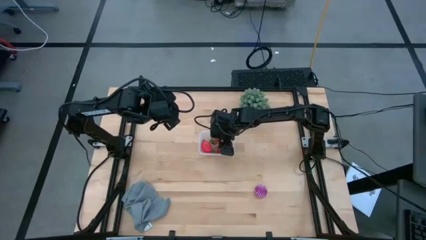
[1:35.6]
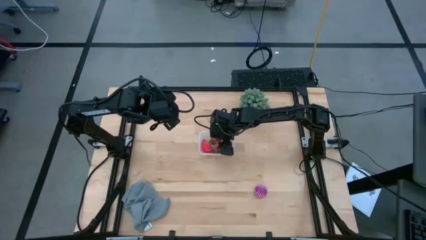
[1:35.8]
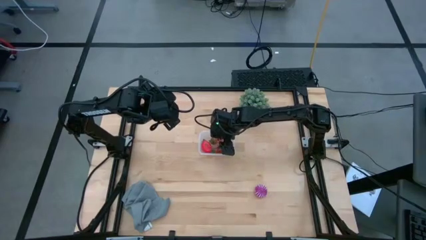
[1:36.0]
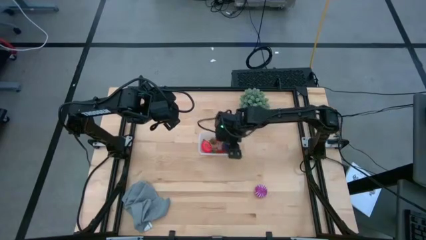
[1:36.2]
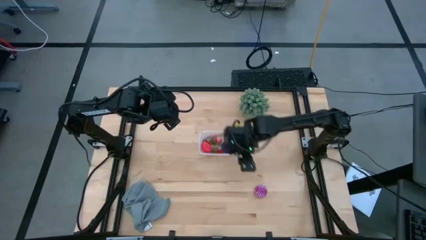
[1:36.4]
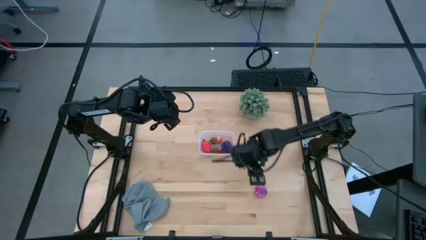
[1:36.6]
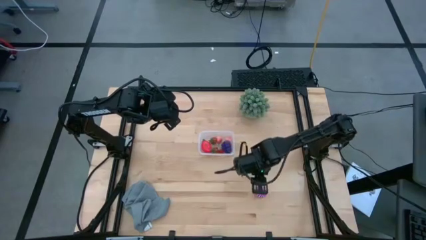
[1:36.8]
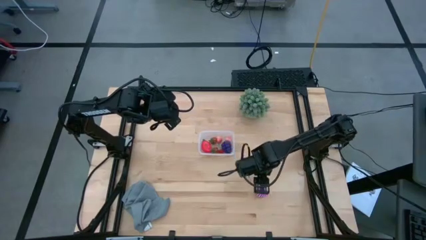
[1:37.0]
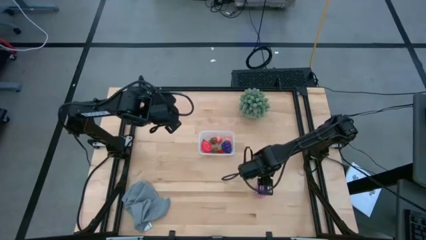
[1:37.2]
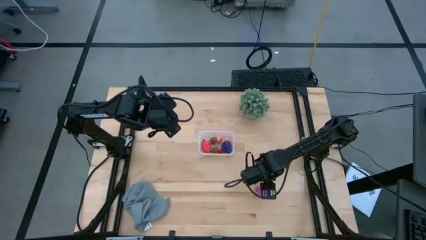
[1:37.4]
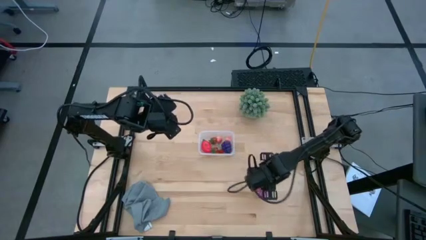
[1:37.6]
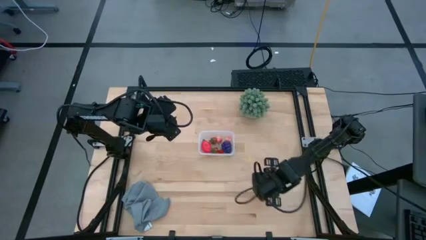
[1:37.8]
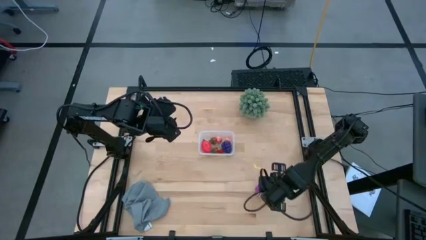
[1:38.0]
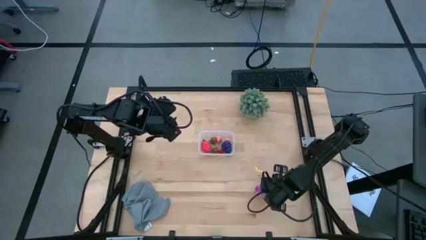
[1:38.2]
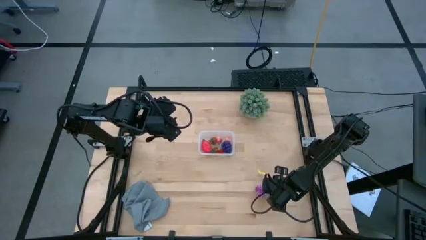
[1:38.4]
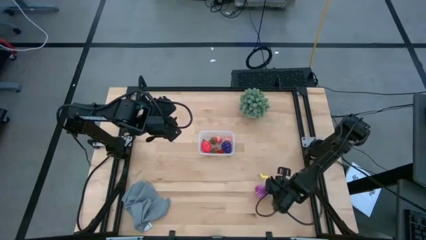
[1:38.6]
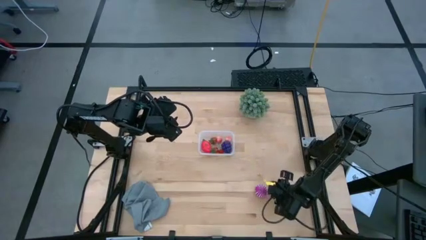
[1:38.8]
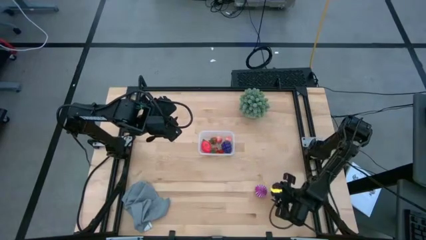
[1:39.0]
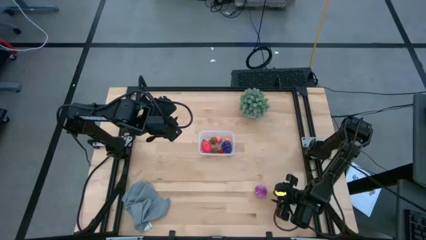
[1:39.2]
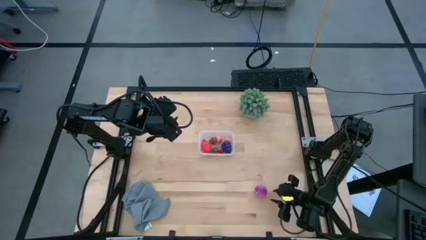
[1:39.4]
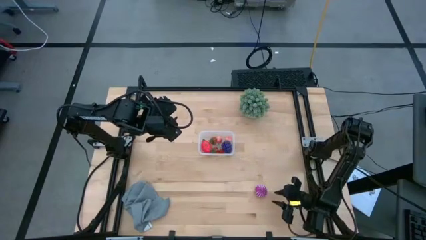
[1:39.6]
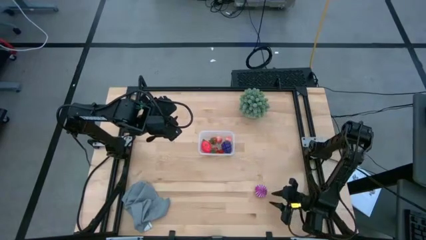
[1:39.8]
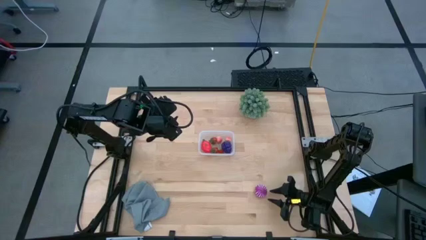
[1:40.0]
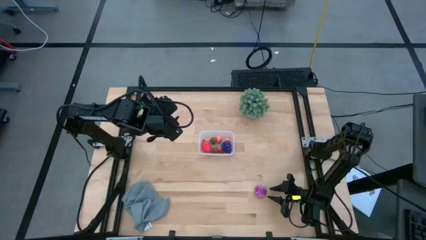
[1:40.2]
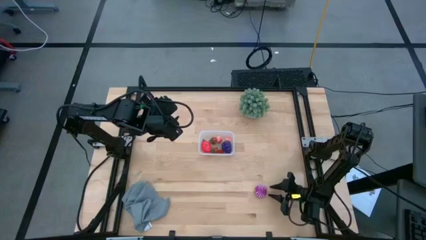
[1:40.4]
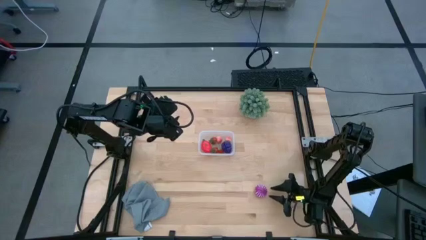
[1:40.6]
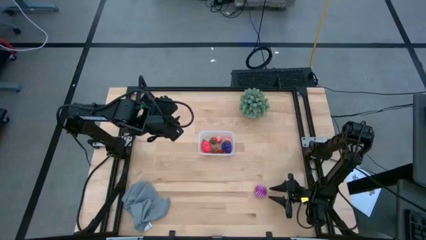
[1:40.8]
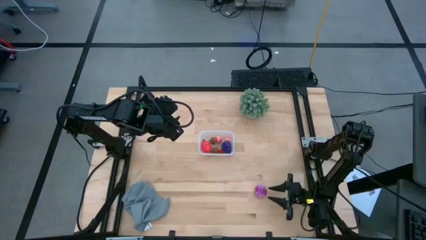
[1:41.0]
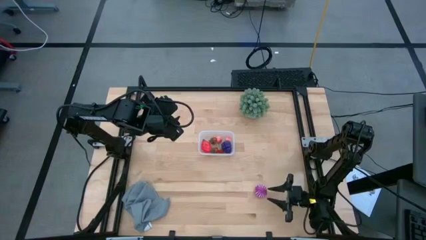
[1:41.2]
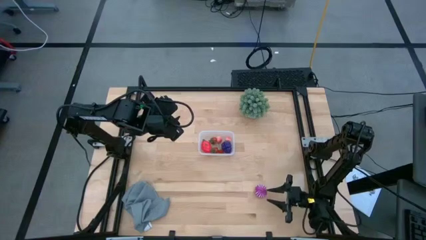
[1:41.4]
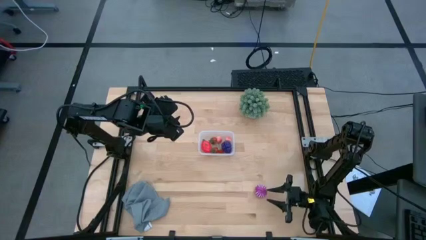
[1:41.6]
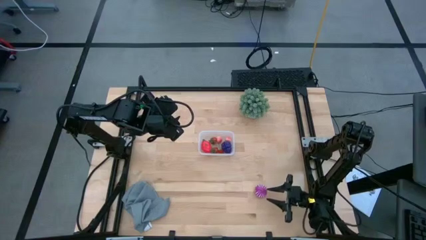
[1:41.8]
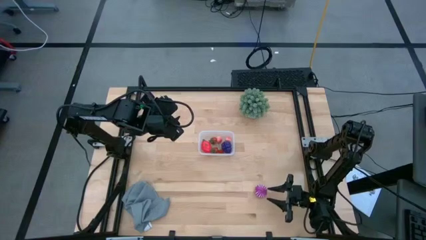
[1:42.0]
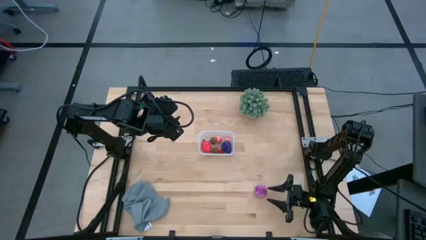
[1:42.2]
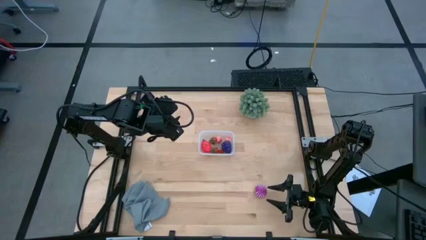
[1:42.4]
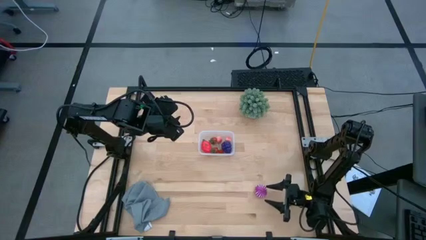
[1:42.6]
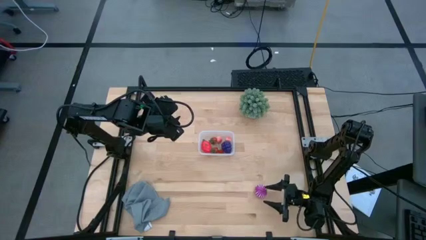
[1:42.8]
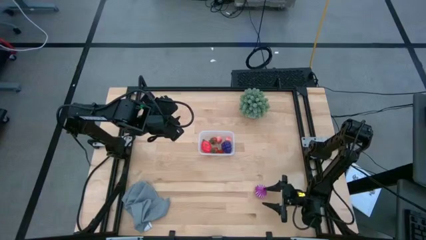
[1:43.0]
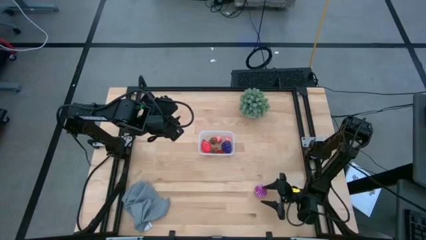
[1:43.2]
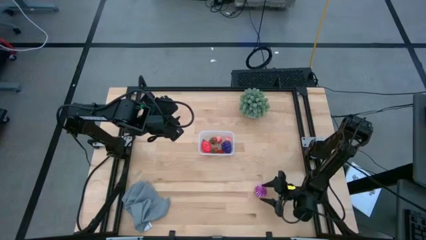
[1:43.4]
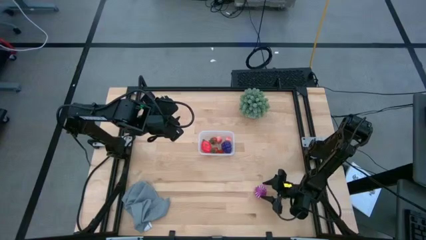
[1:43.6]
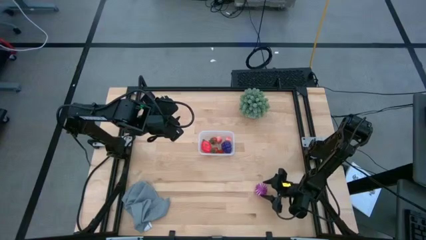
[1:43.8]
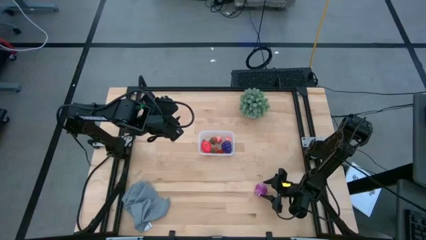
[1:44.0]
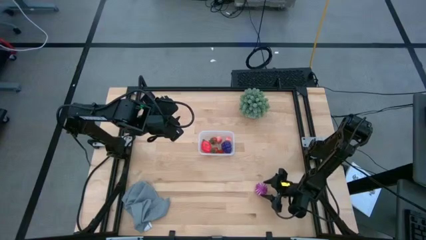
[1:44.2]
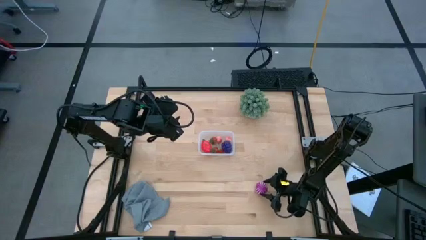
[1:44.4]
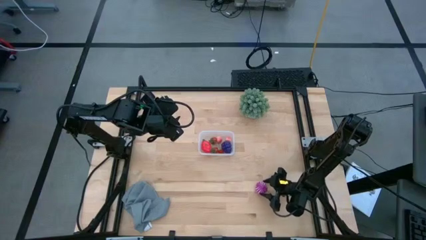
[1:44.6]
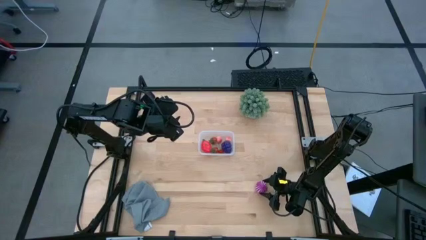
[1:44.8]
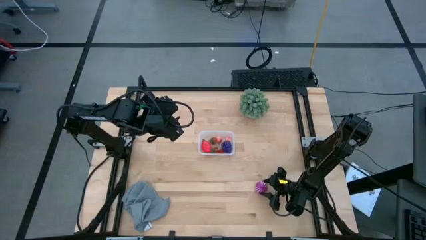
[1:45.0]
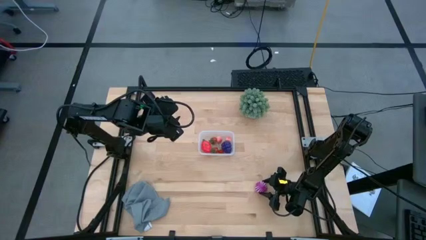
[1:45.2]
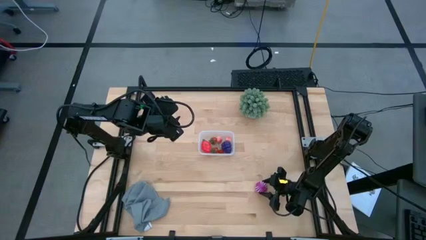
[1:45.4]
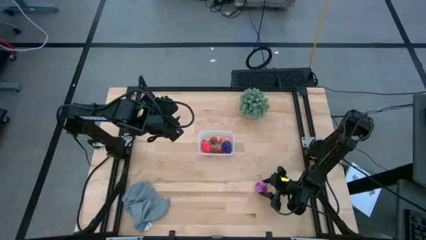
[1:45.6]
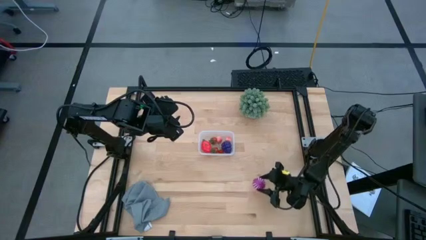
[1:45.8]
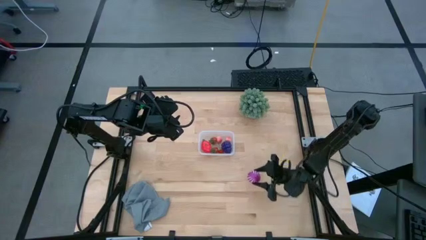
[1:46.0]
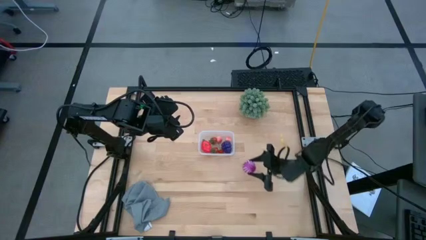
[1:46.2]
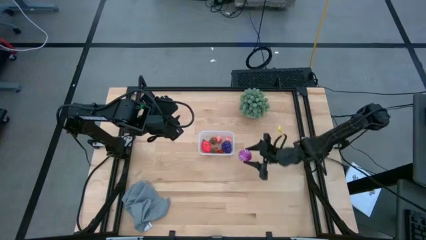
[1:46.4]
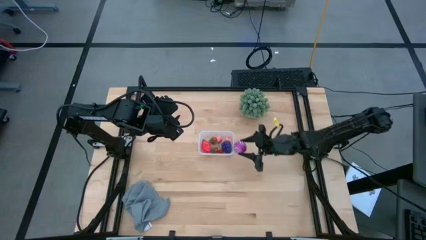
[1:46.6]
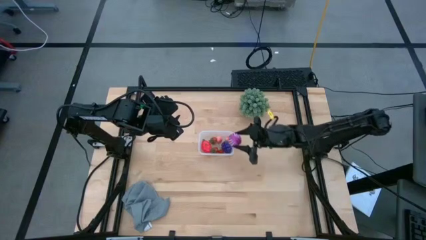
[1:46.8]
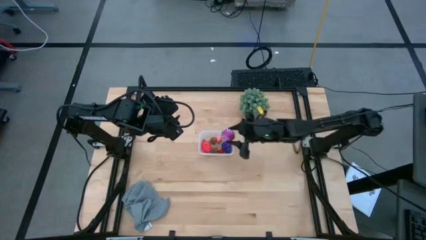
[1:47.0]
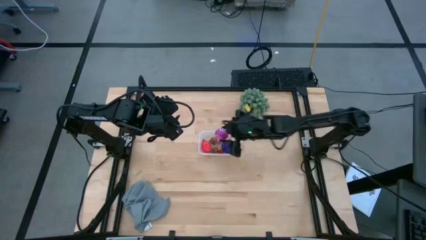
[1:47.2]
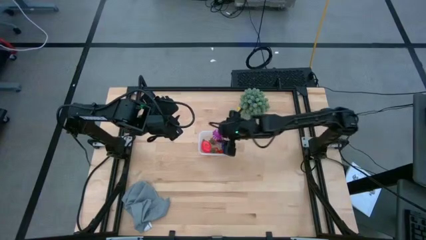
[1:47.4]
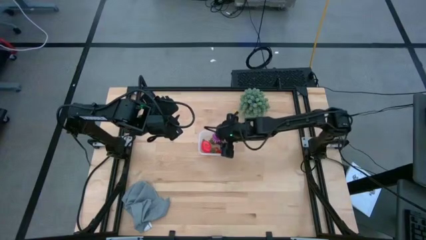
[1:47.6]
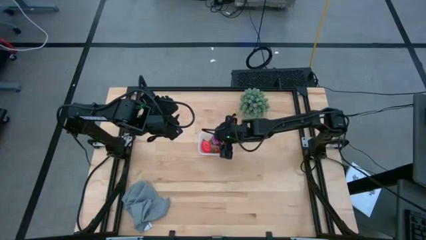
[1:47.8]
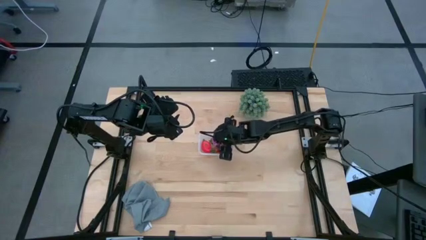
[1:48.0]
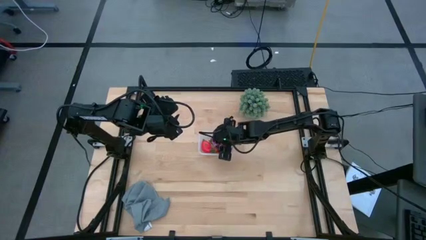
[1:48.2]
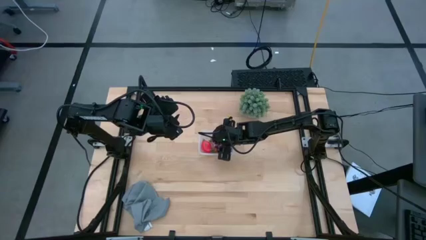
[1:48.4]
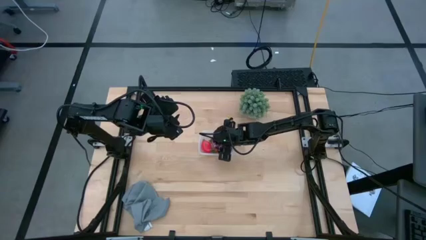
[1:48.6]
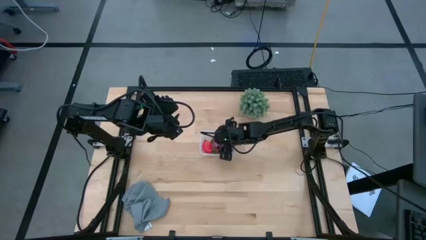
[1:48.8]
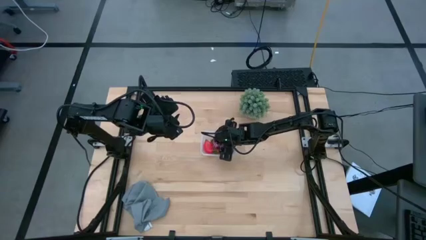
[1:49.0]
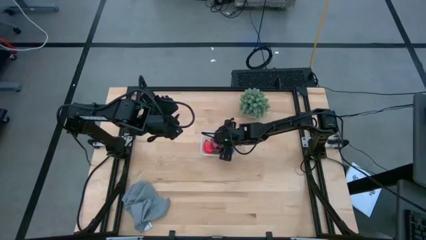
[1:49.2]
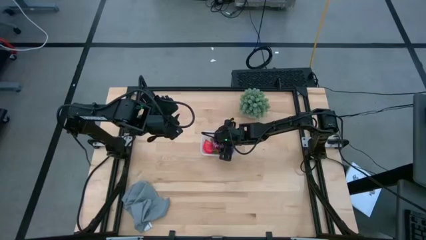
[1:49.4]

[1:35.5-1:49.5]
Task: Pick and placing Produce into tupperware
Put the purple onion into the transparent bin

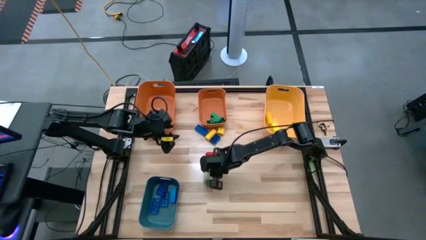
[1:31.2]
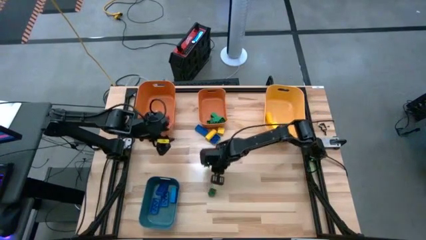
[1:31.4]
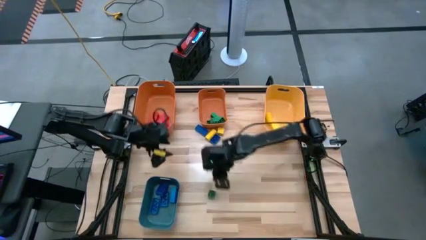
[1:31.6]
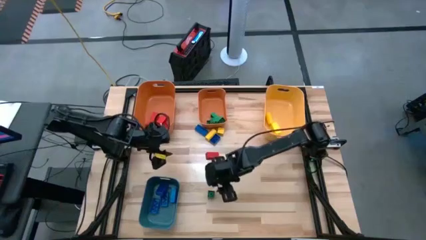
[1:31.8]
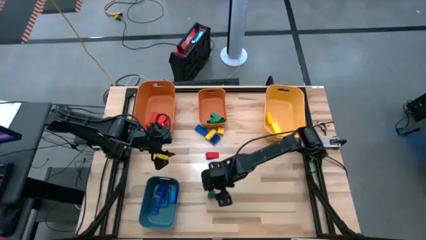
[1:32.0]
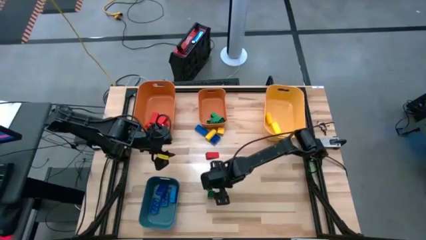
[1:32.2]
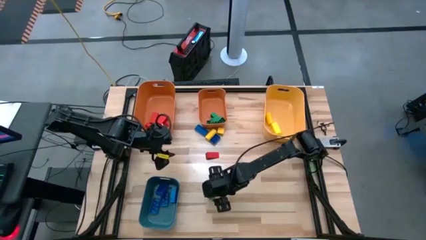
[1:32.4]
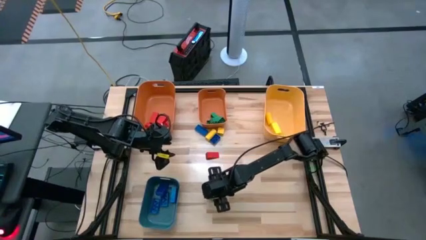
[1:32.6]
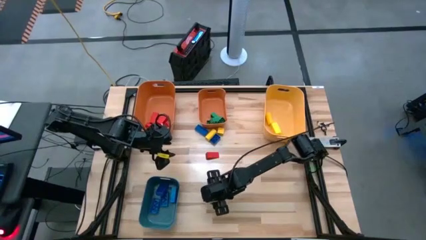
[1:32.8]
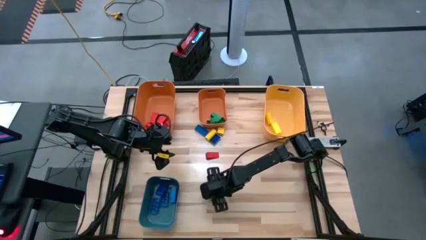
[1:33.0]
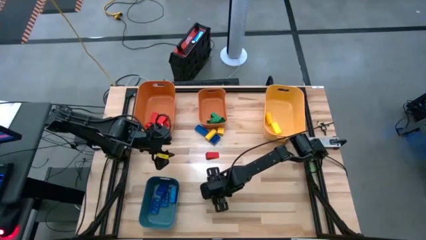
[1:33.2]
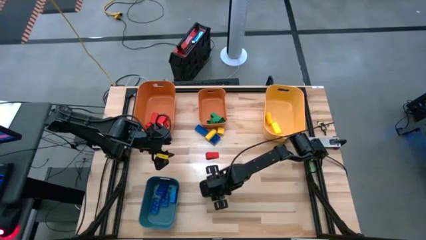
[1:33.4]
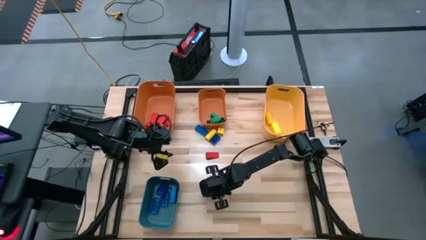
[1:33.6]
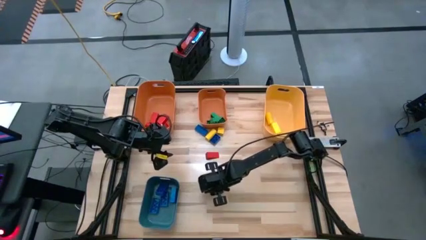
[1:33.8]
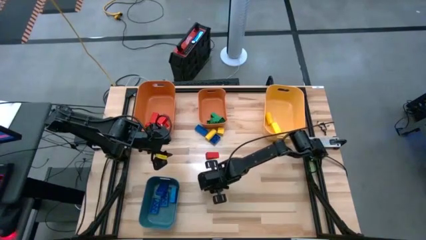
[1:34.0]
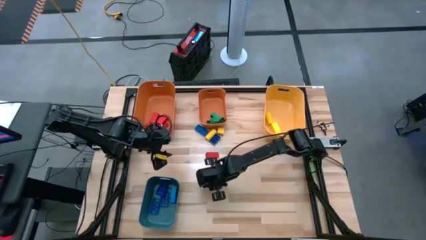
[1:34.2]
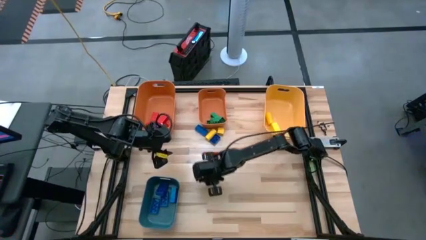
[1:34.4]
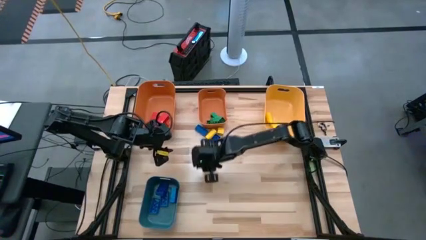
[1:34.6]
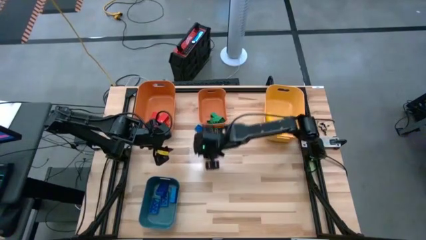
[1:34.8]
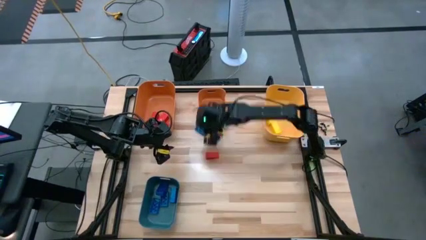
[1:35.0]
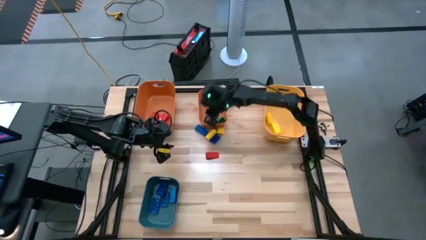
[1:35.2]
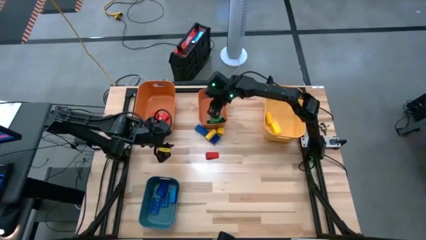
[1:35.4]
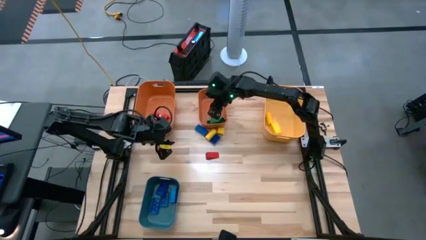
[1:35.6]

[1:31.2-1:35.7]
Task: Sort blocks
Put the green game piece into the right orange bin
